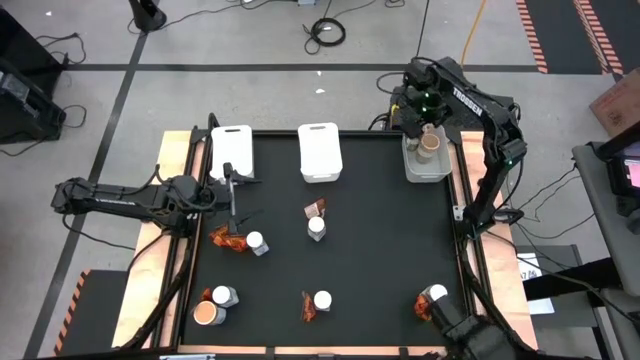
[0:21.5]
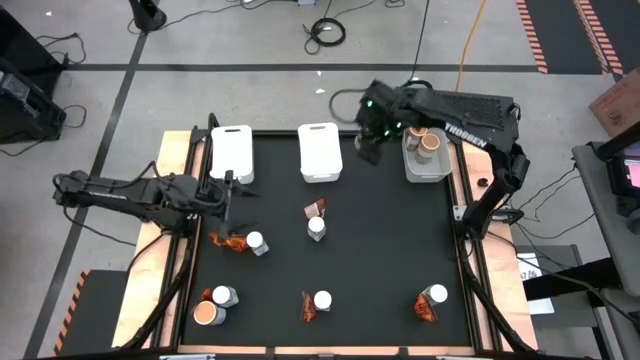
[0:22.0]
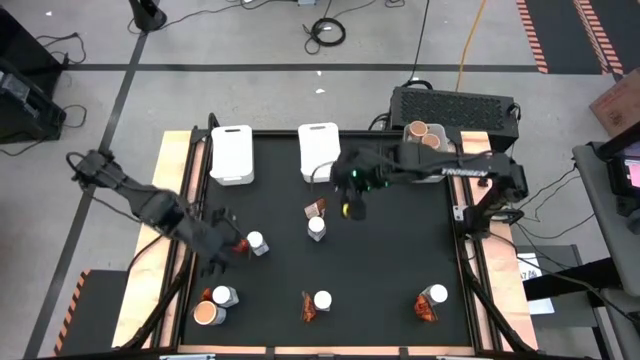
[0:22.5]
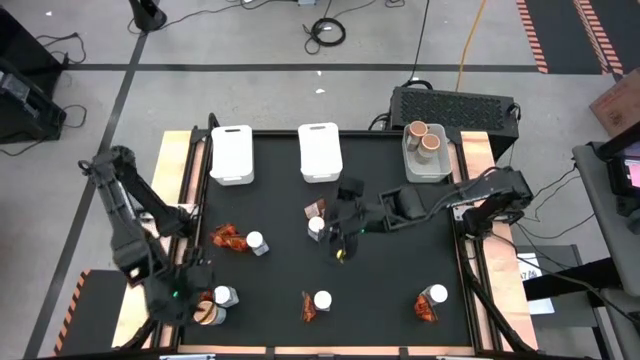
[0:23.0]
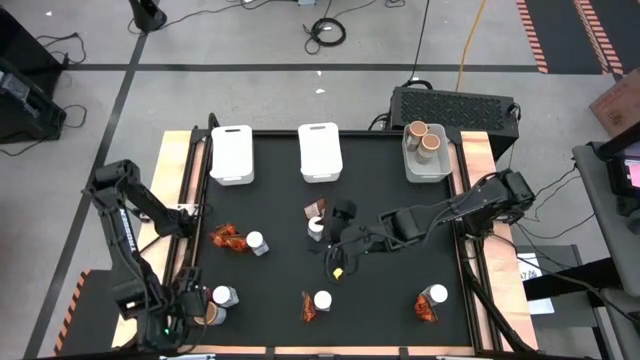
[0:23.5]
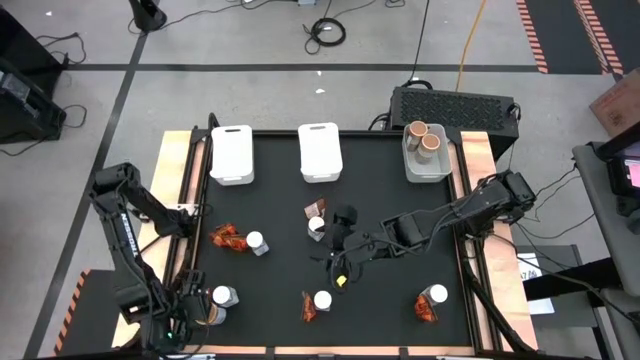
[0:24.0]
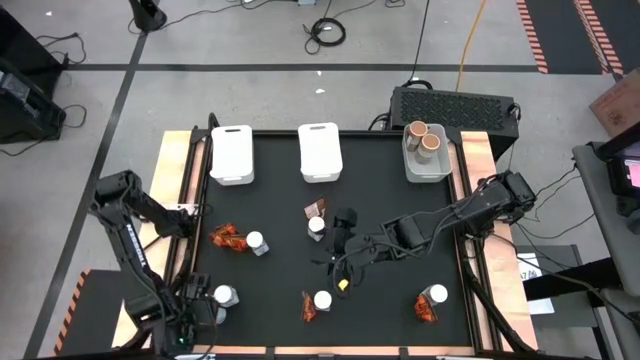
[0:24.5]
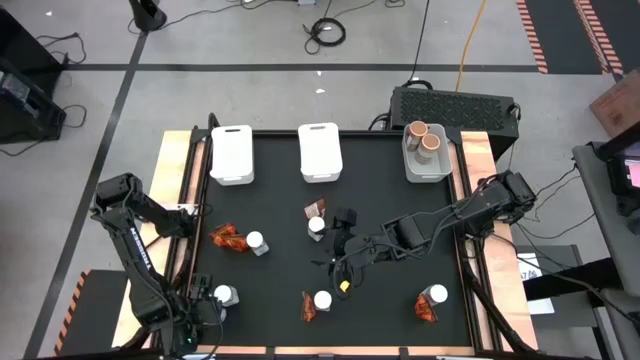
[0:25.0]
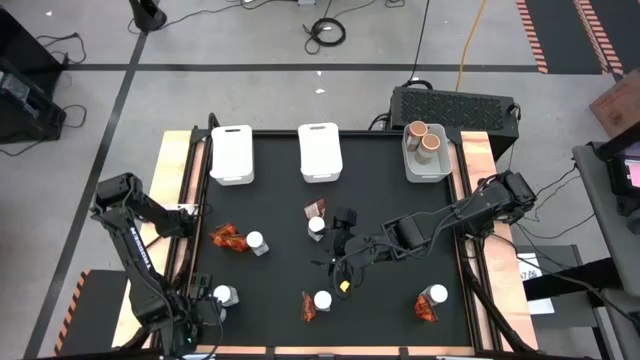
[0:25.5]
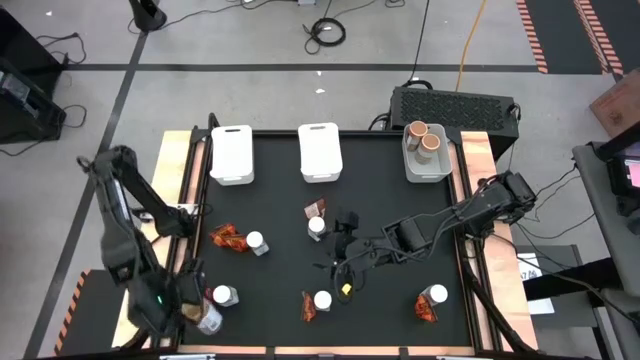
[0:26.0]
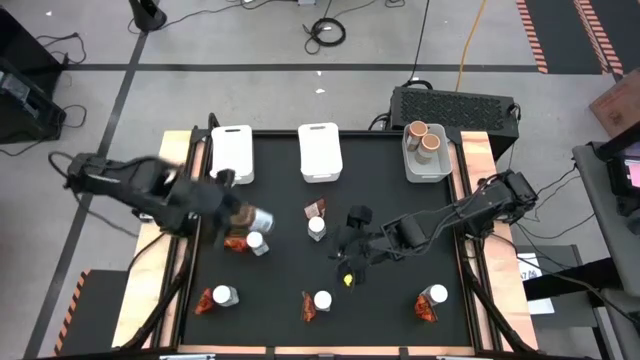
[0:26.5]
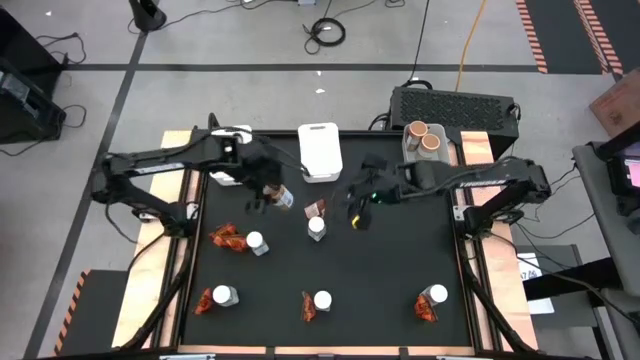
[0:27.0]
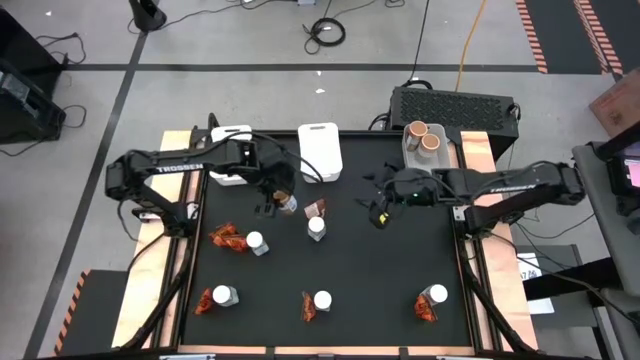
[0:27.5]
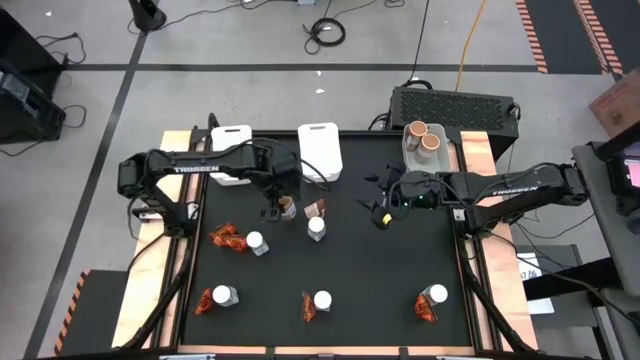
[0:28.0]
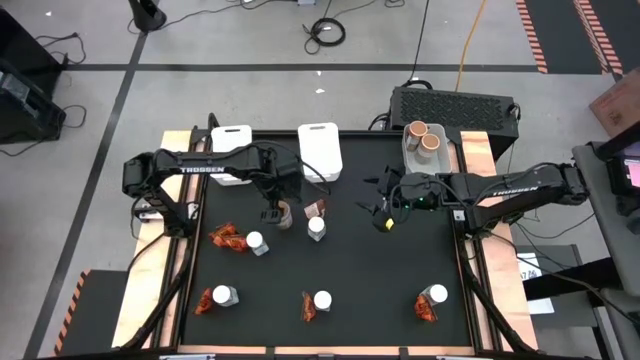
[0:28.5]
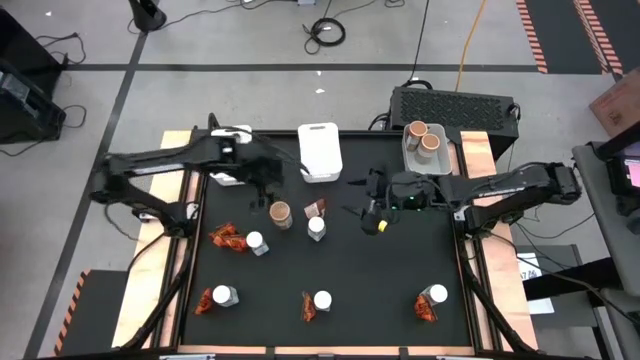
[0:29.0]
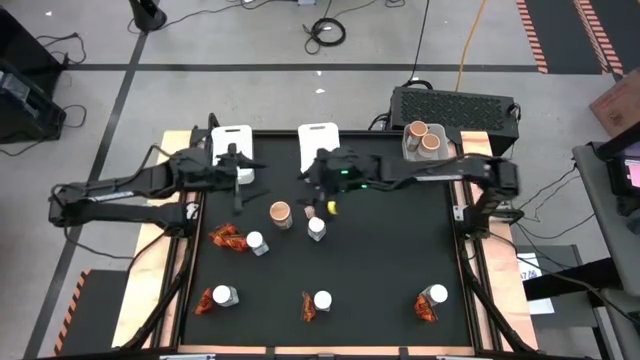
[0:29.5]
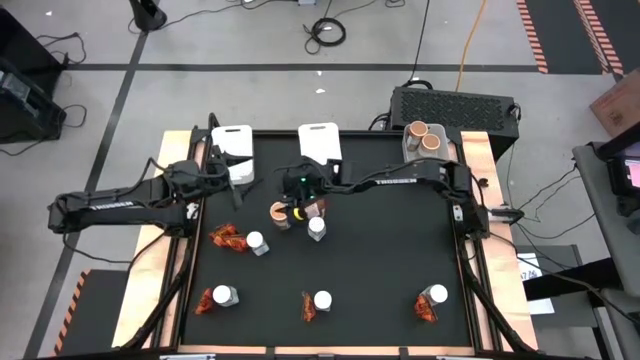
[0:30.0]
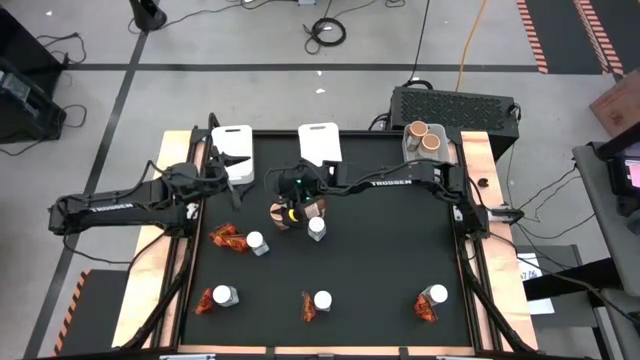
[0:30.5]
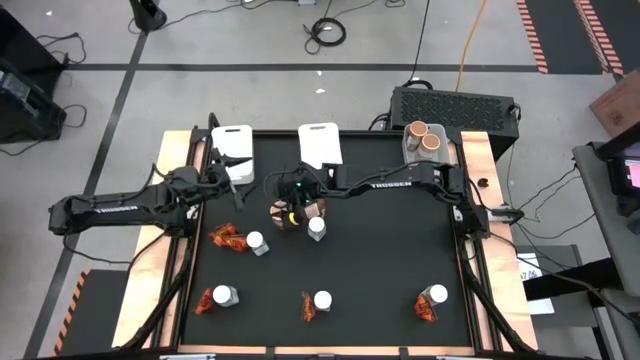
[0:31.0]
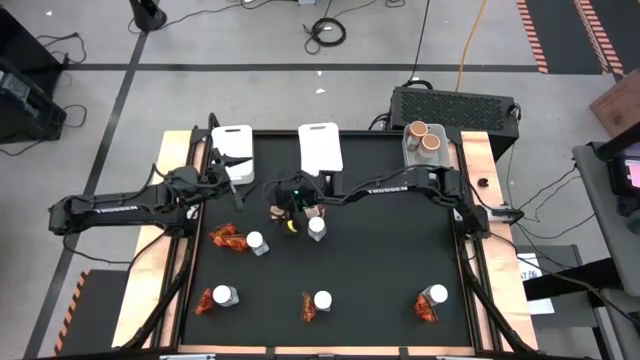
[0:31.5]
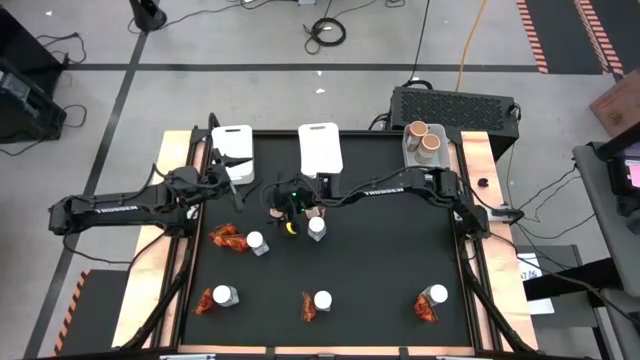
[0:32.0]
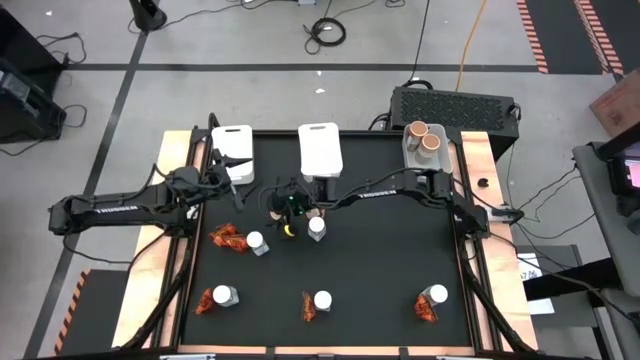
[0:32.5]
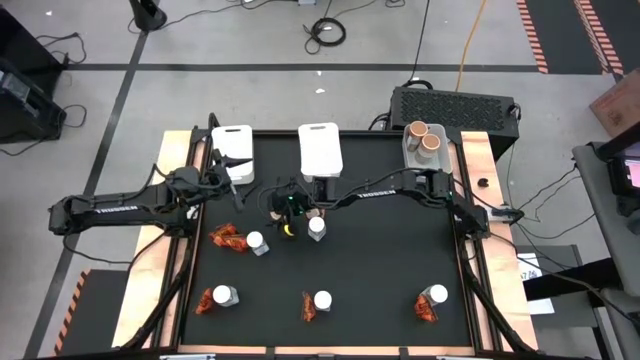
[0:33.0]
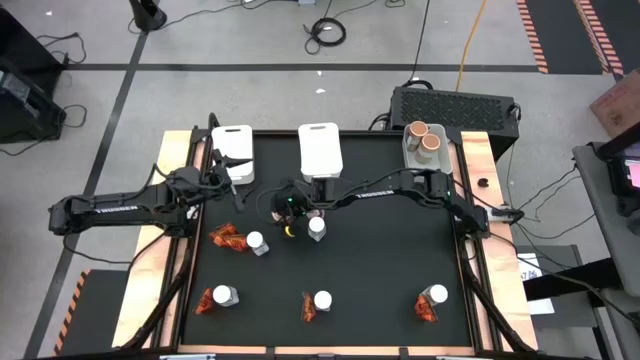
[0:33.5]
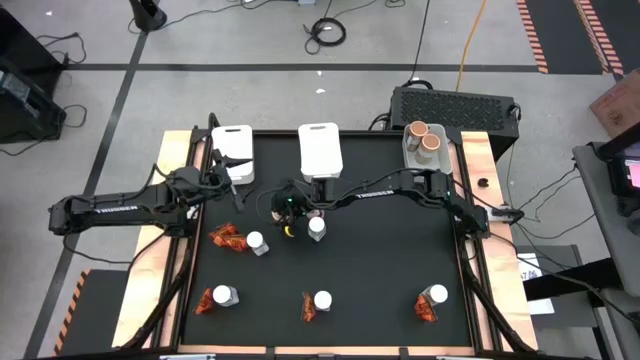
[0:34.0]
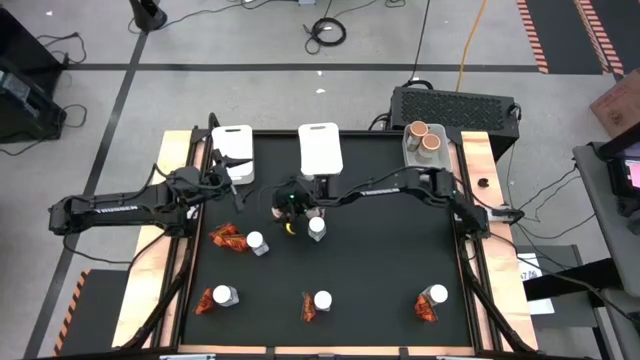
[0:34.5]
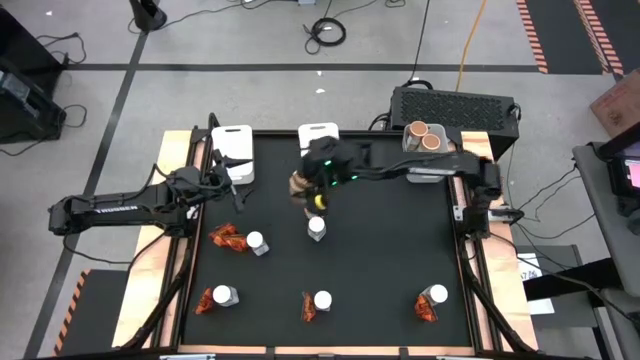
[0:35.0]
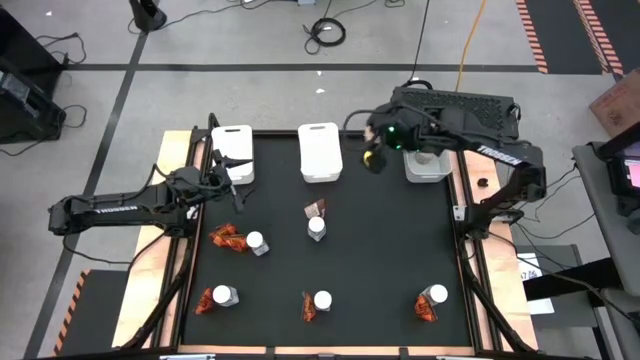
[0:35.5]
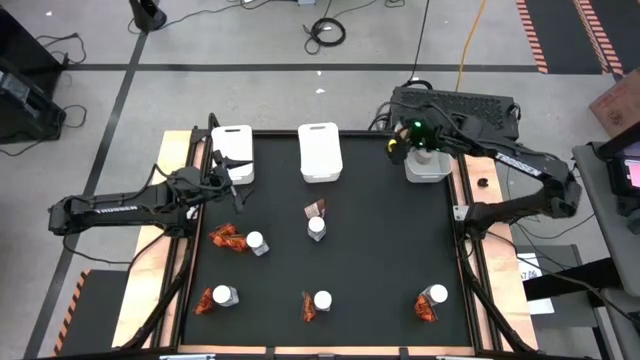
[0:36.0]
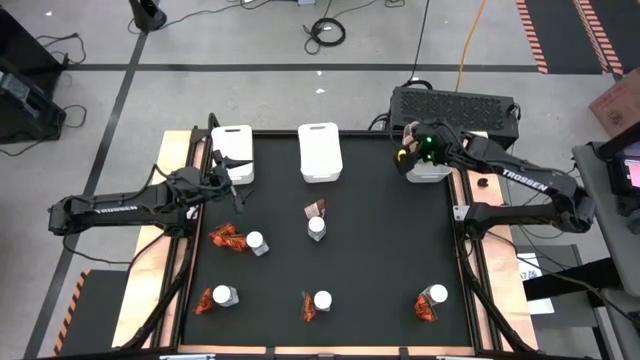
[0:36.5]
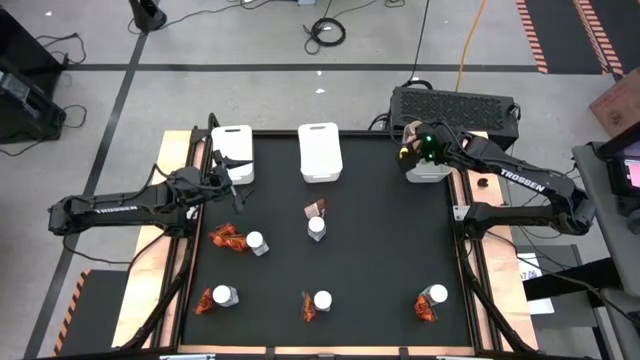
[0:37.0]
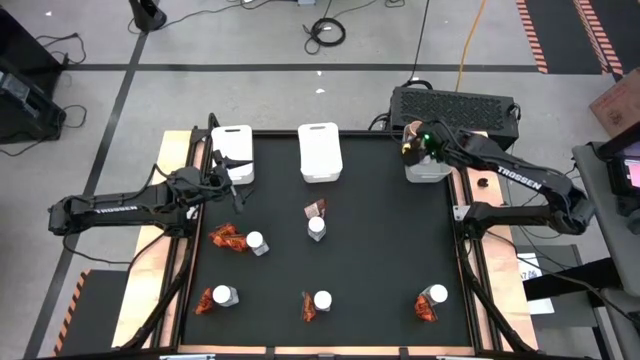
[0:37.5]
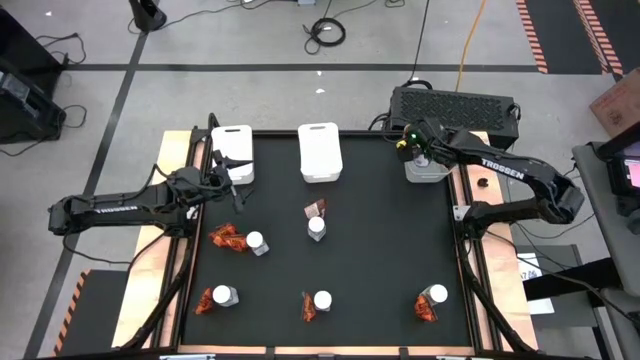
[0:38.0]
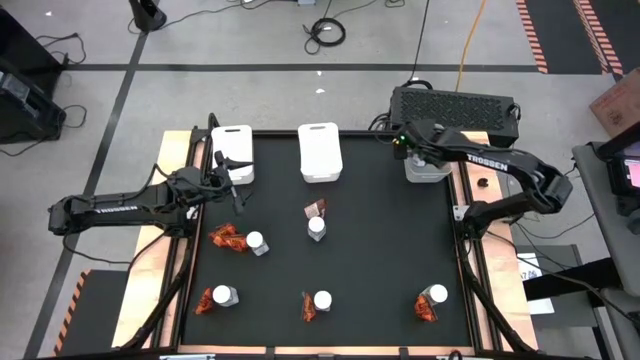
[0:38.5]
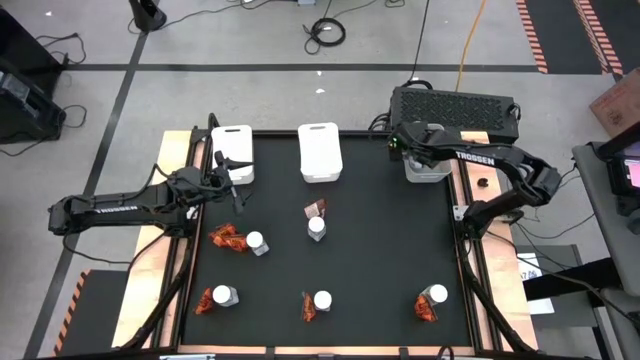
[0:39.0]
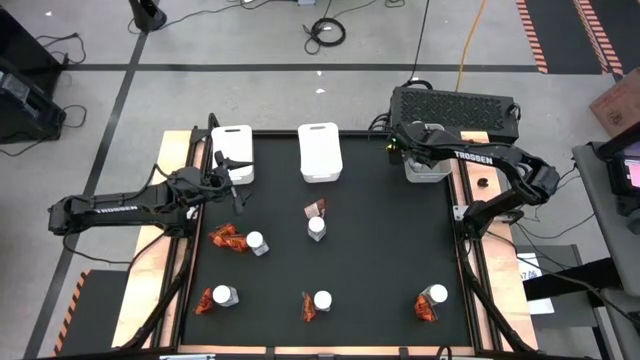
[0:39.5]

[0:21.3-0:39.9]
Task: Sort spices by type
Put the gold seasoning bottle into the gray bin

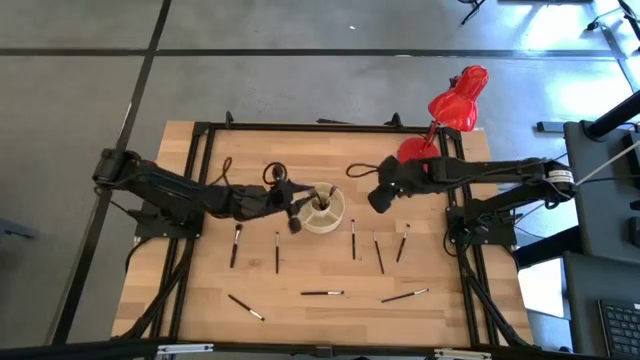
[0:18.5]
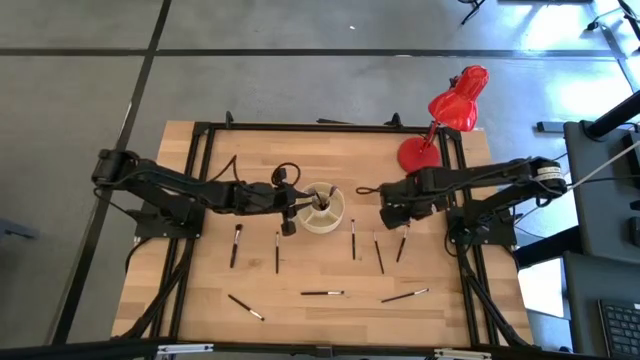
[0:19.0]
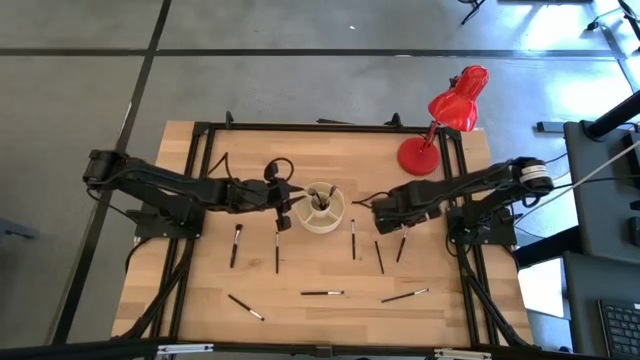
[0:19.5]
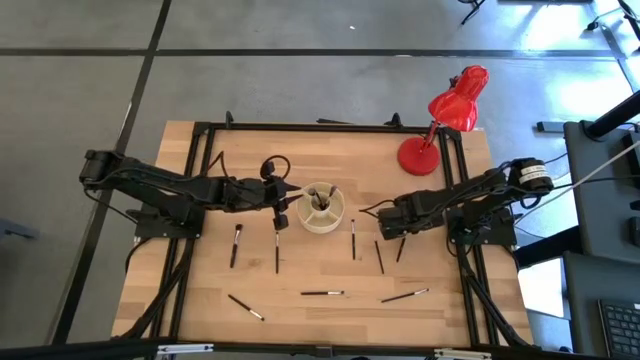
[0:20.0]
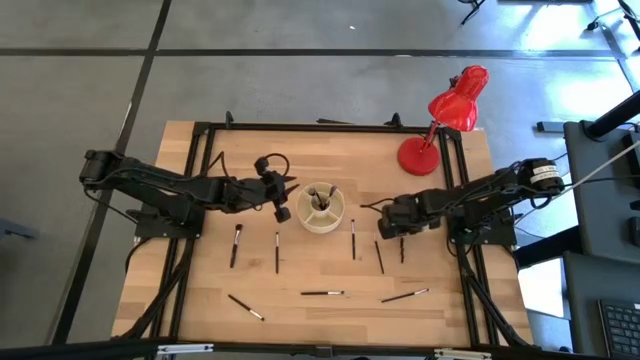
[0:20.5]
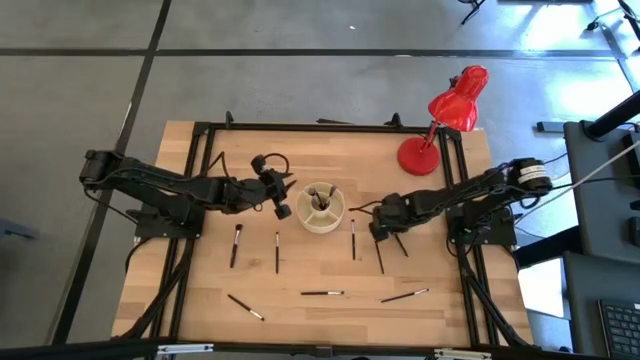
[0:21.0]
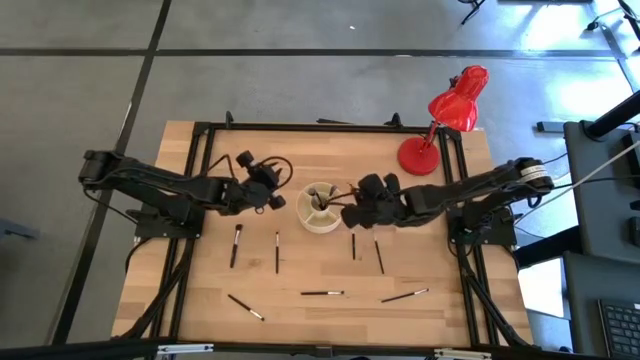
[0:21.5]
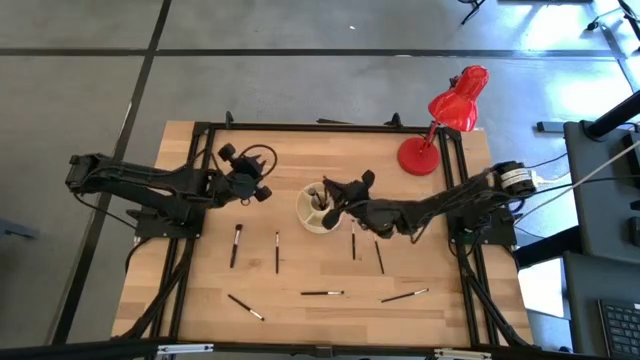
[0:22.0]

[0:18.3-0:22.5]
Task: Put items in baskets/containers
Put the eyeshadow brush into the white organizer
